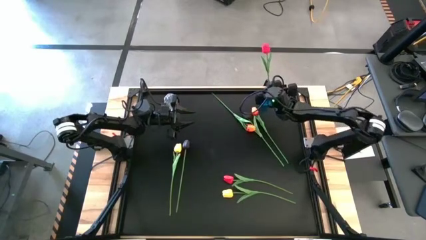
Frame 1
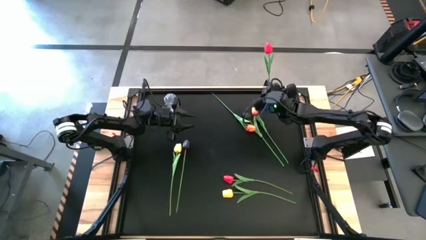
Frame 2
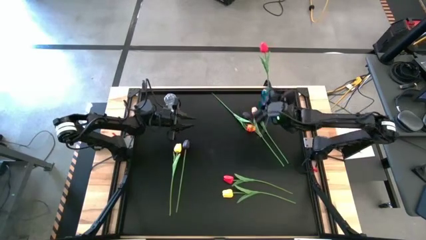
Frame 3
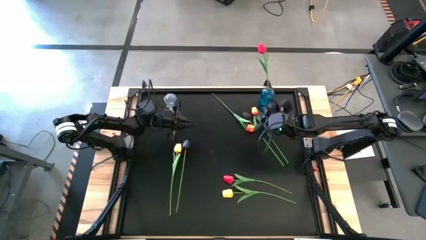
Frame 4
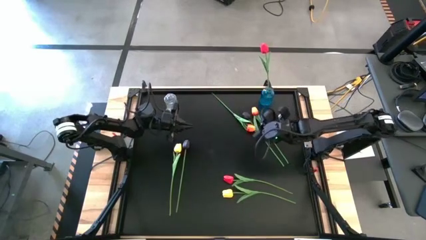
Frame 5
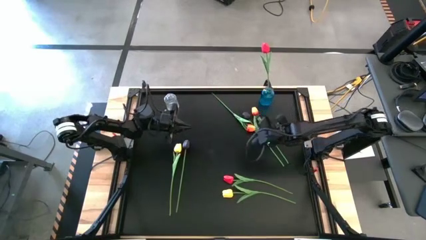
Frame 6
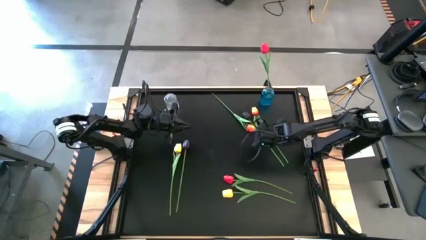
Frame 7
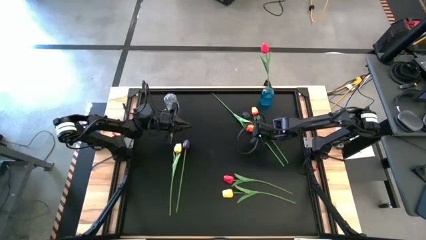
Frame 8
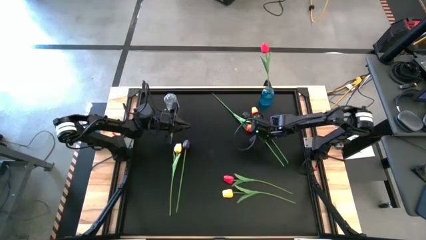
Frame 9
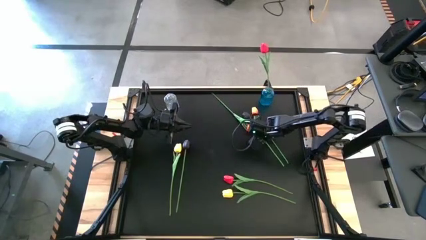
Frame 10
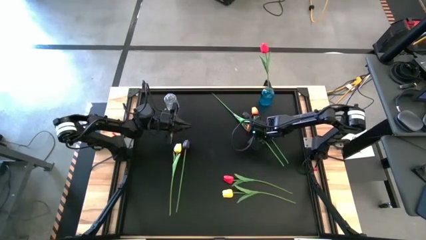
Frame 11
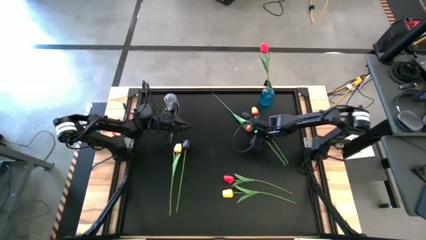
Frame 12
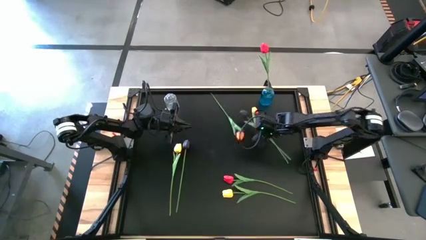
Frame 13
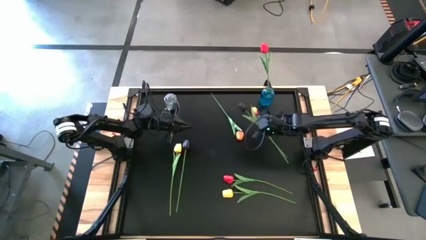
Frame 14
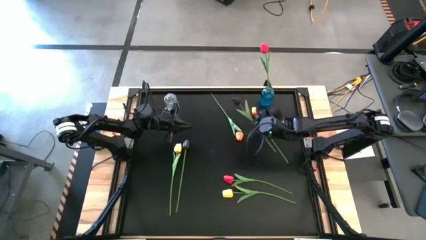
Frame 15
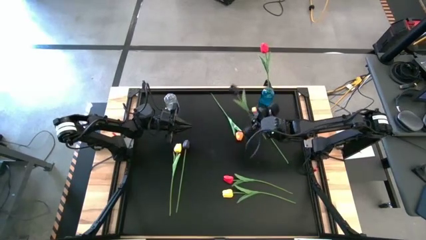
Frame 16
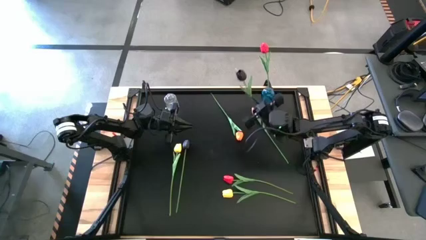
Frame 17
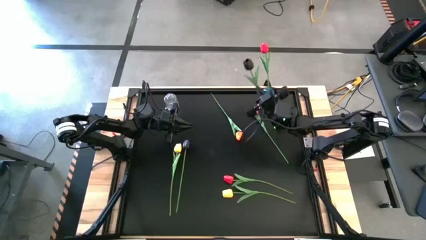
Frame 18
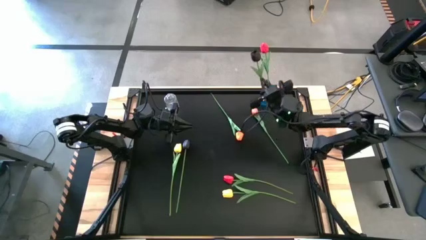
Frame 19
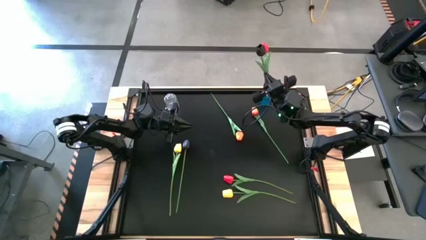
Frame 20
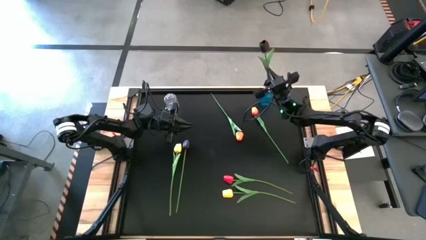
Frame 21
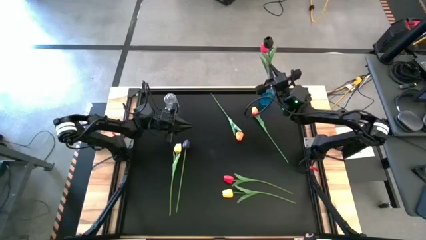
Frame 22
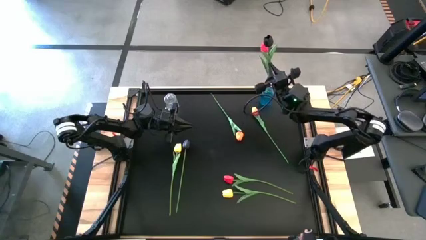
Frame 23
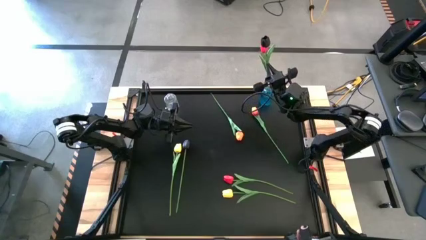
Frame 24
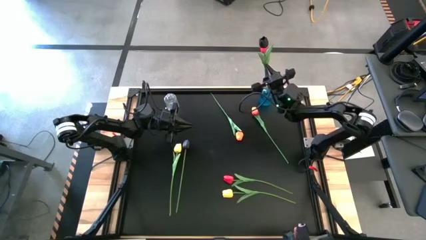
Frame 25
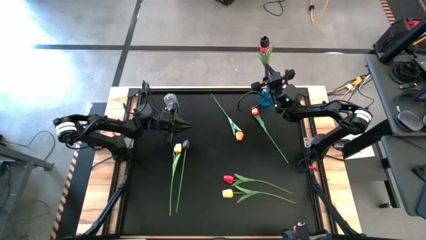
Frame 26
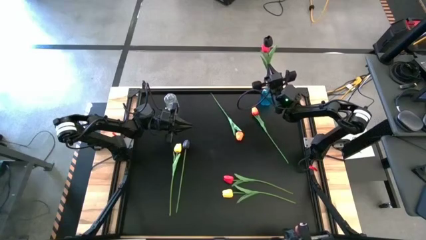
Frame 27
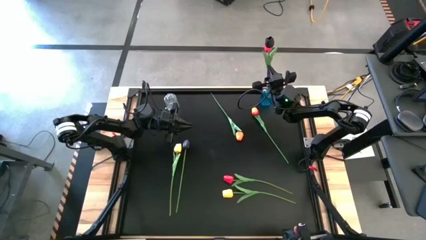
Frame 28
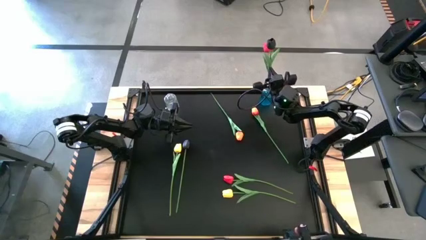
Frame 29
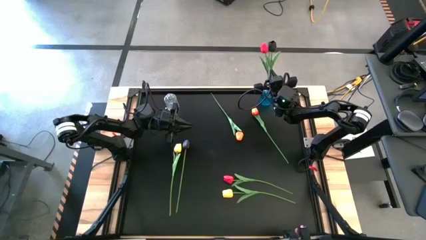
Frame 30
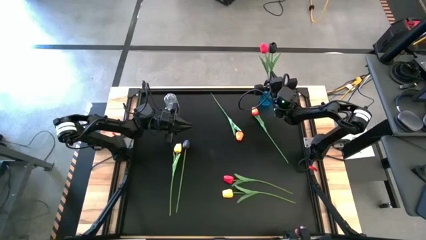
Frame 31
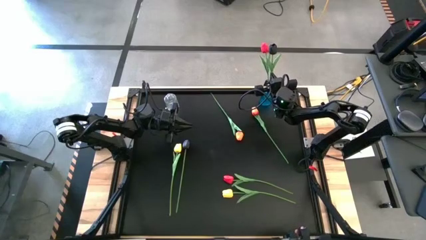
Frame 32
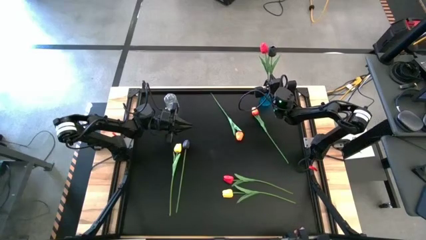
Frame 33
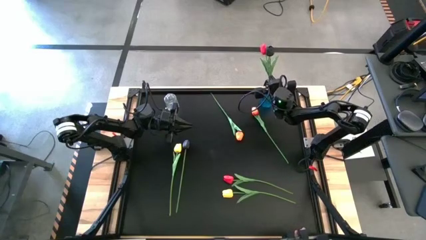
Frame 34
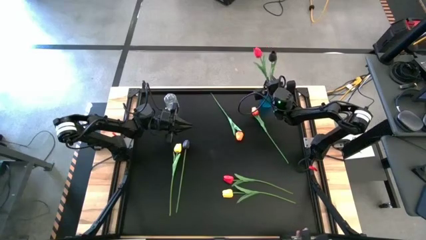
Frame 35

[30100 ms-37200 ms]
Task: Sort flowers into vase by color
Put the top black tulip into the blue vase

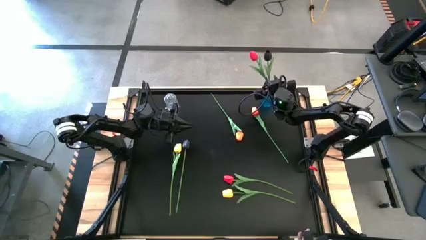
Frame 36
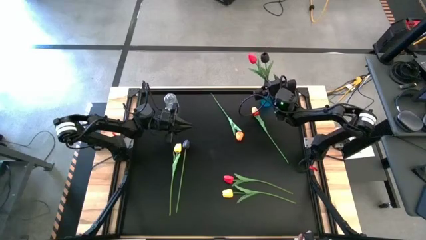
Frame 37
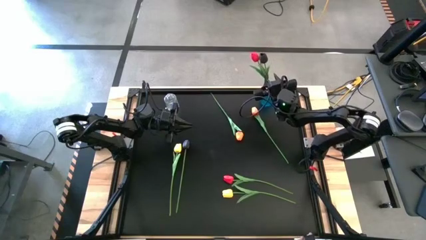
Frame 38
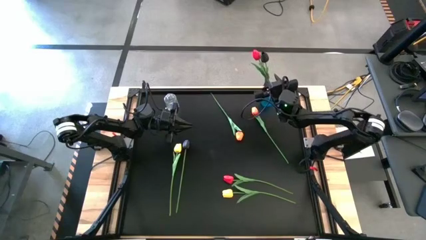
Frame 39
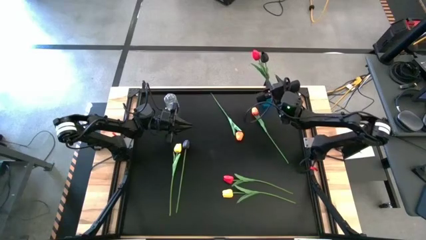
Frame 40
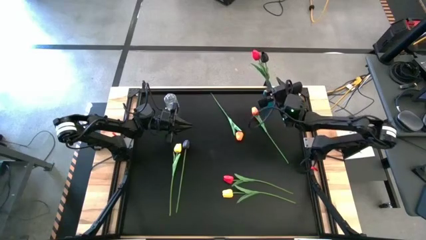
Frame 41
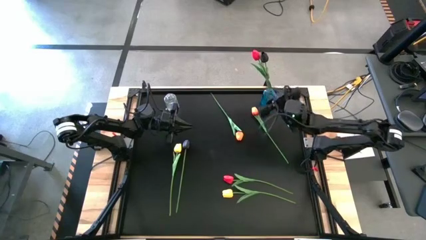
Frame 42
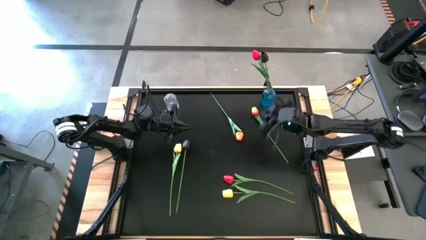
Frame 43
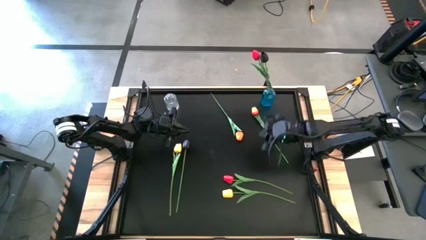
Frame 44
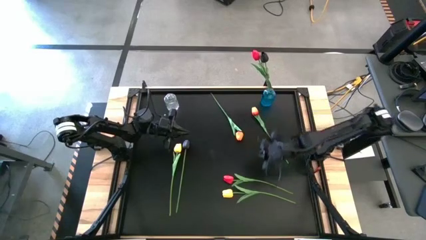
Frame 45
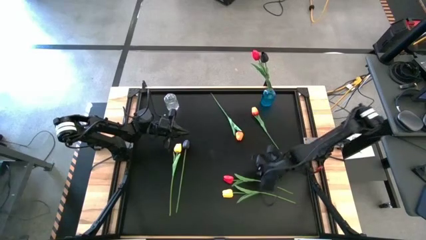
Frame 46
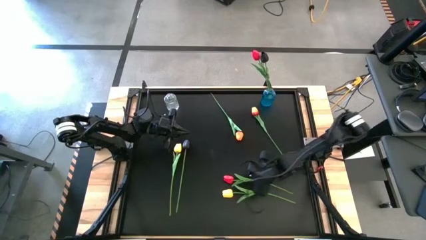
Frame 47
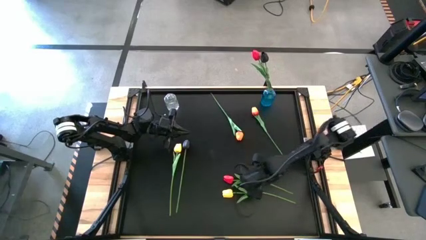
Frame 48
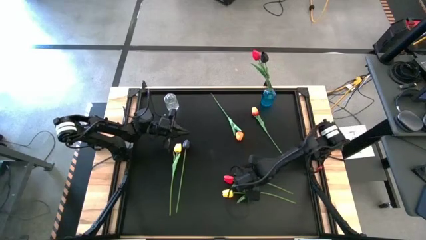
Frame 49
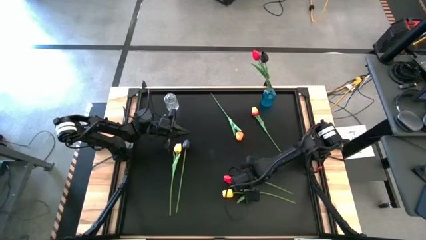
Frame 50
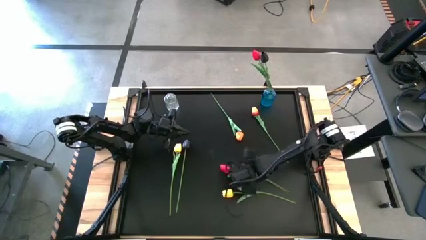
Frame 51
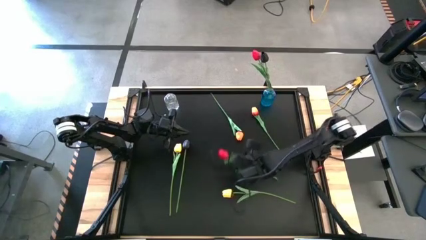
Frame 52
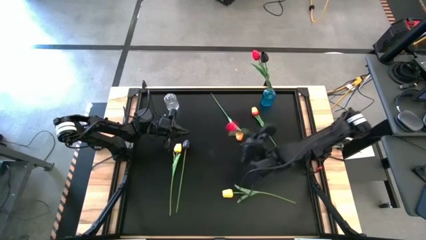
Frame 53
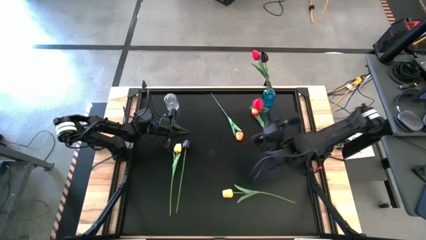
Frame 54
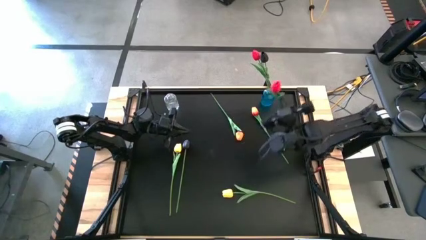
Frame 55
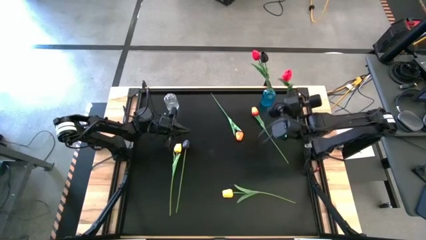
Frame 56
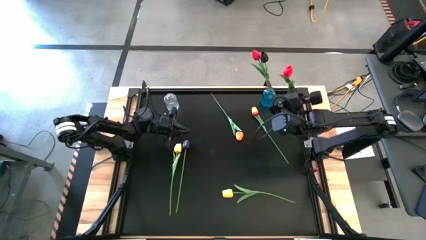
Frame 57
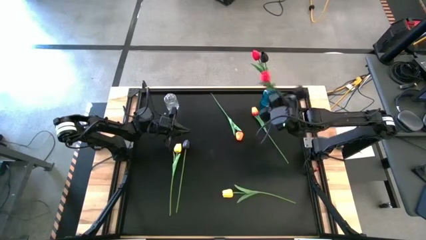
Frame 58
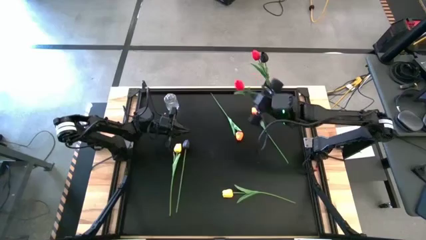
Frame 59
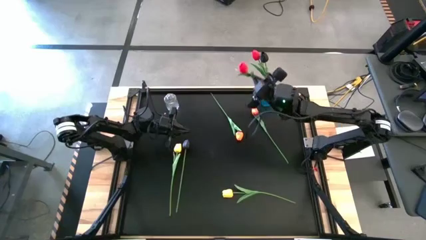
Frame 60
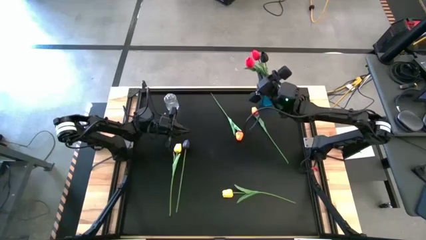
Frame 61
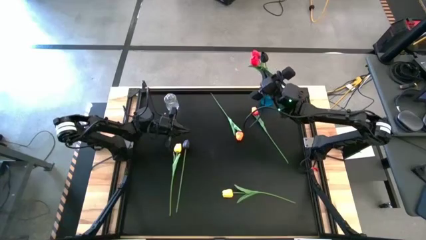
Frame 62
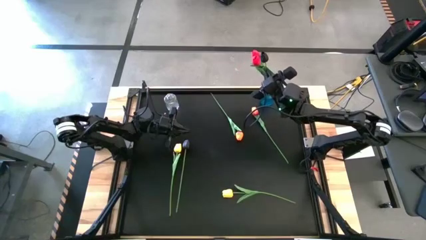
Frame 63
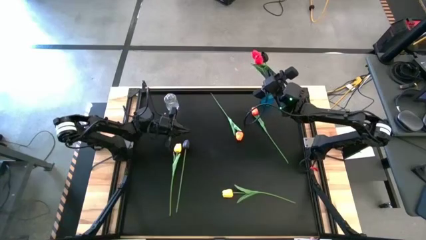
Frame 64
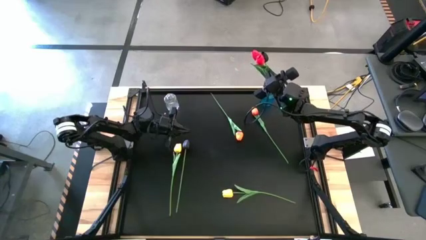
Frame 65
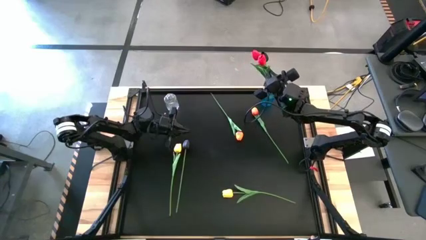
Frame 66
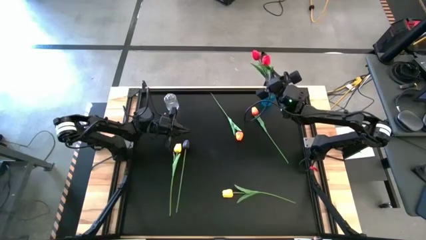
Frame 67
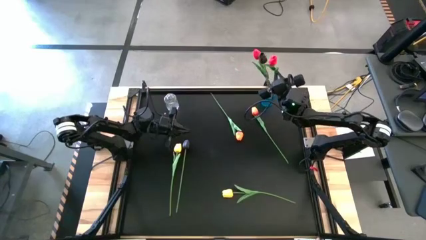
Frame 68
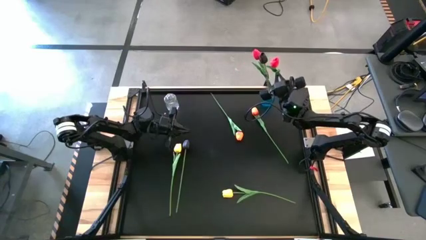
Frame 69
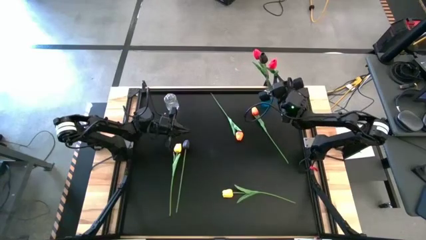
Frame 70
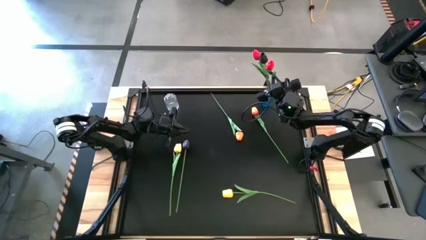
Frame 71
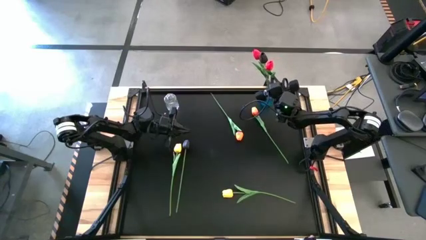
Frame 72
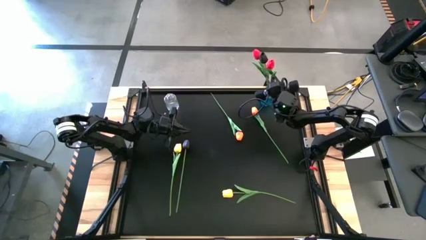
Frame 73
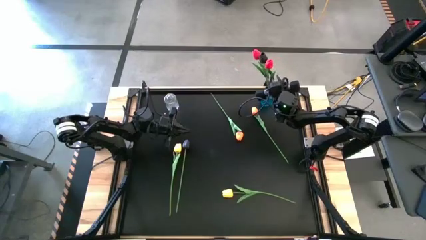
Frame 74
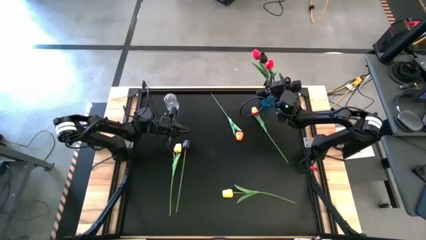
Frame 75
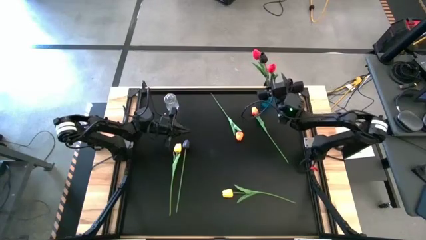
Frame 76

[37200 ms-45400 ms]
Put the red tulip into the blue vase
